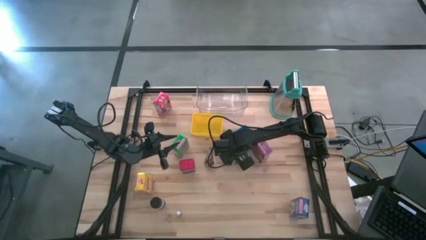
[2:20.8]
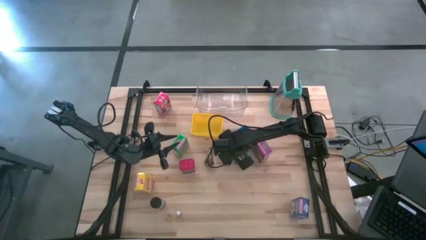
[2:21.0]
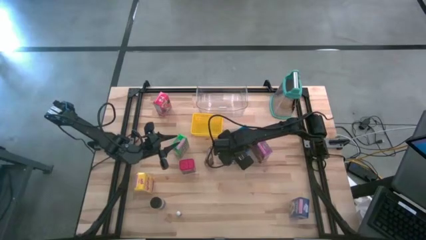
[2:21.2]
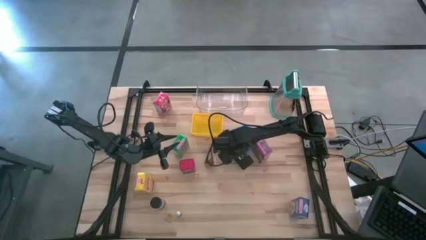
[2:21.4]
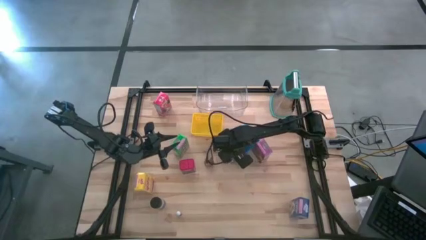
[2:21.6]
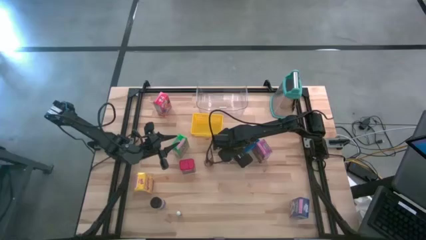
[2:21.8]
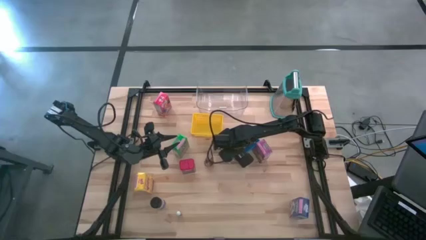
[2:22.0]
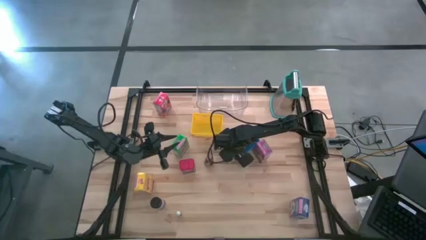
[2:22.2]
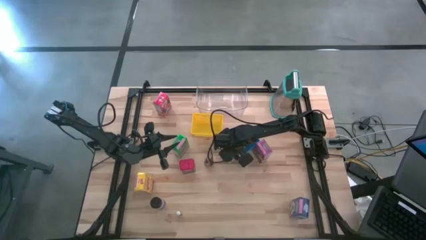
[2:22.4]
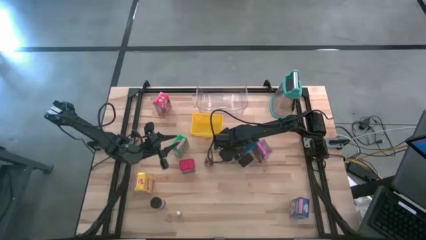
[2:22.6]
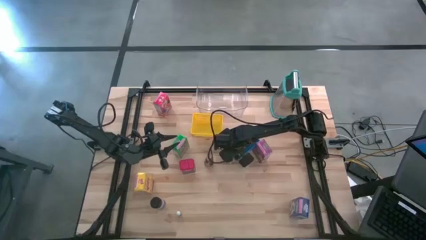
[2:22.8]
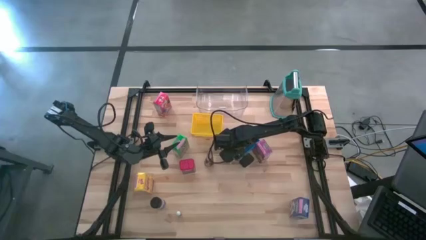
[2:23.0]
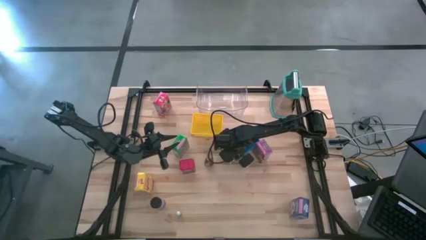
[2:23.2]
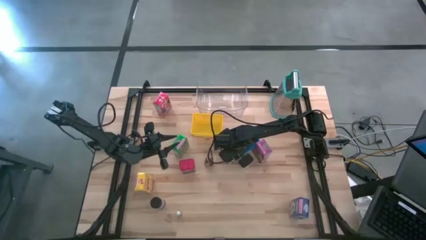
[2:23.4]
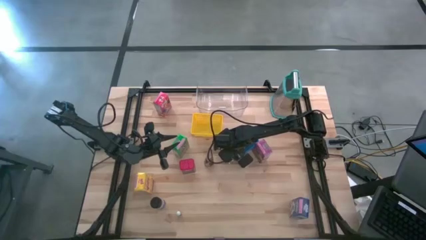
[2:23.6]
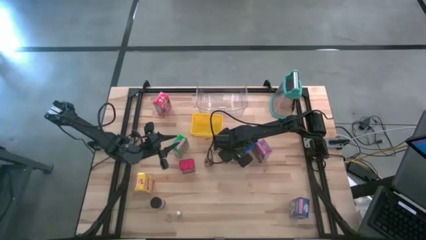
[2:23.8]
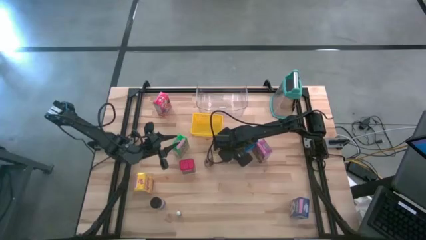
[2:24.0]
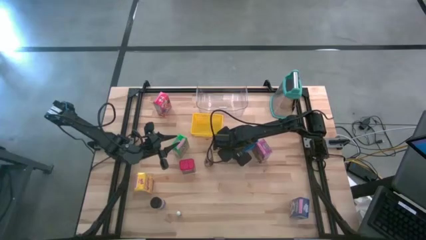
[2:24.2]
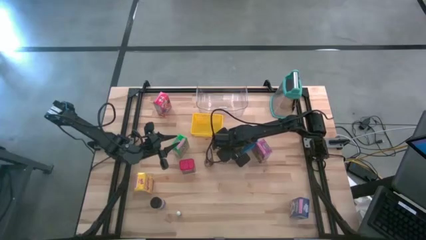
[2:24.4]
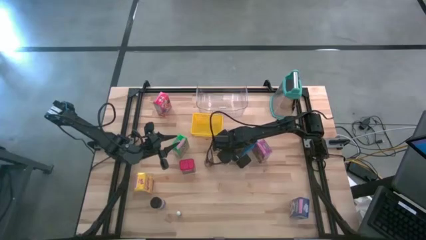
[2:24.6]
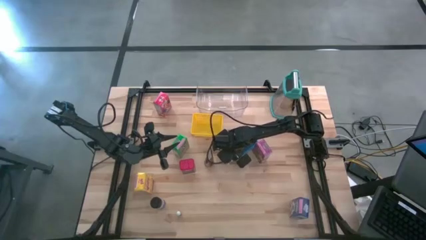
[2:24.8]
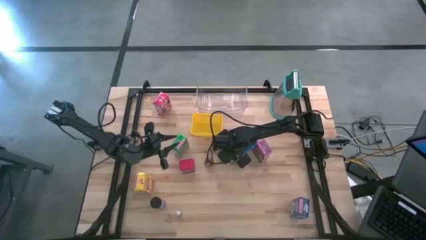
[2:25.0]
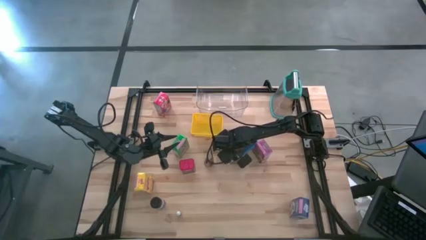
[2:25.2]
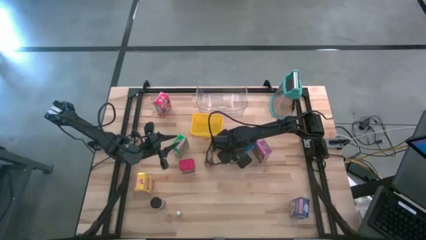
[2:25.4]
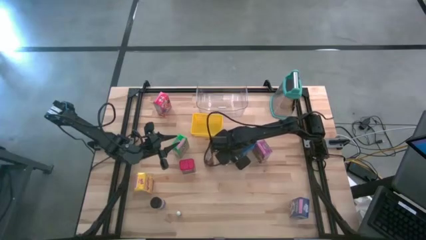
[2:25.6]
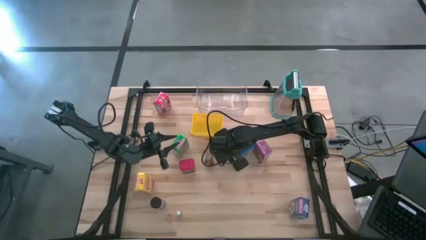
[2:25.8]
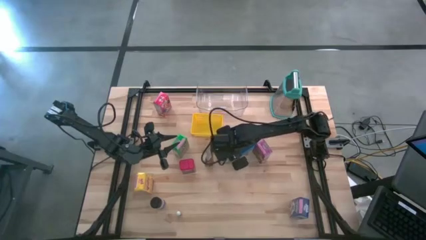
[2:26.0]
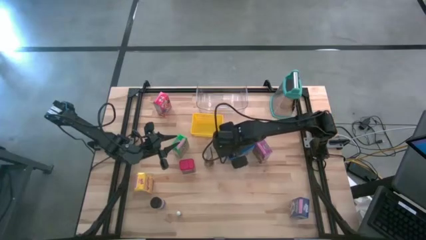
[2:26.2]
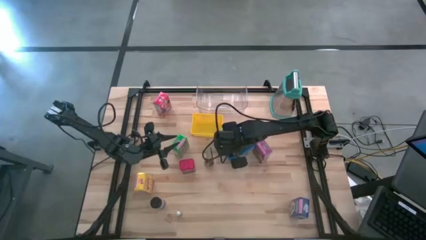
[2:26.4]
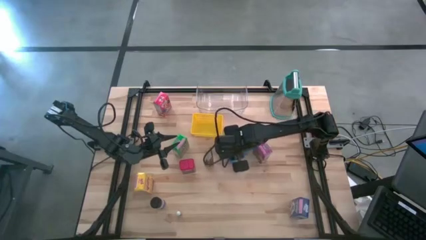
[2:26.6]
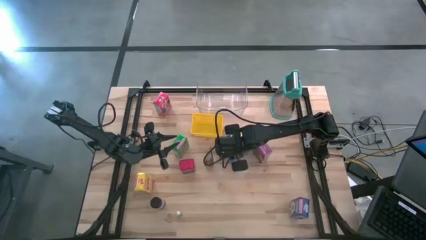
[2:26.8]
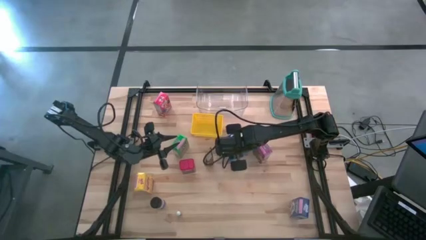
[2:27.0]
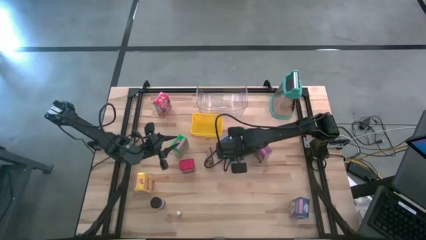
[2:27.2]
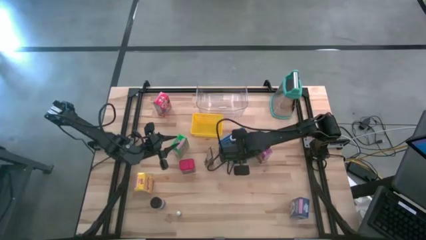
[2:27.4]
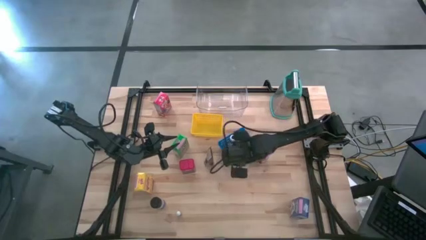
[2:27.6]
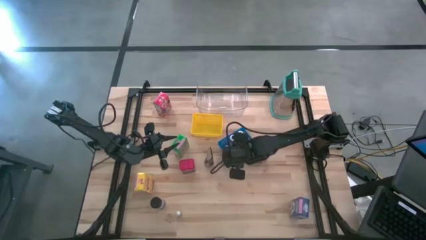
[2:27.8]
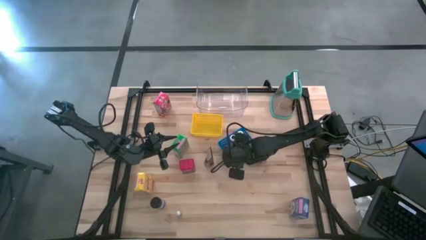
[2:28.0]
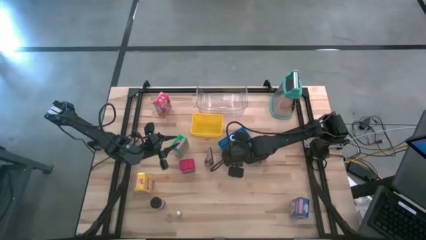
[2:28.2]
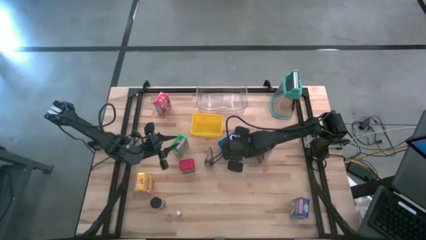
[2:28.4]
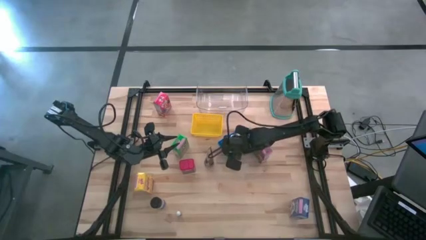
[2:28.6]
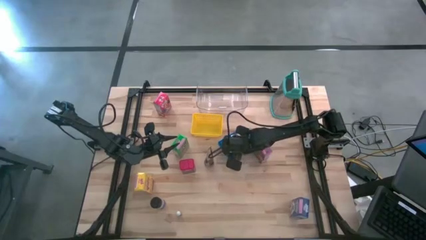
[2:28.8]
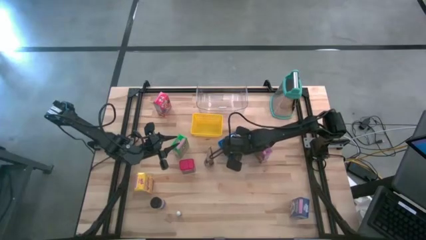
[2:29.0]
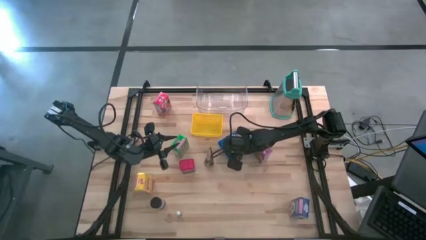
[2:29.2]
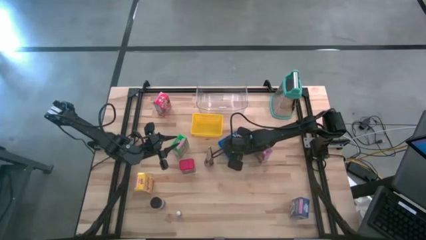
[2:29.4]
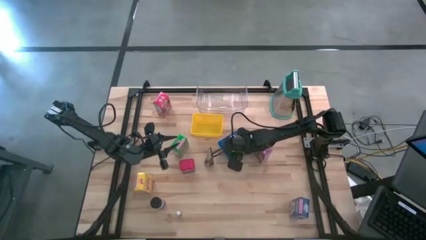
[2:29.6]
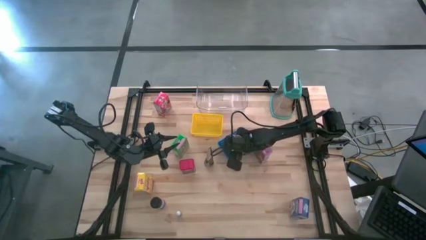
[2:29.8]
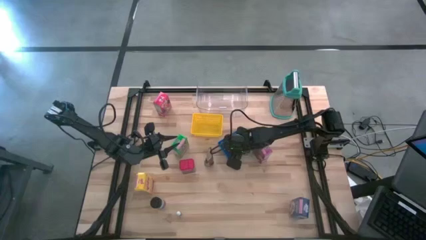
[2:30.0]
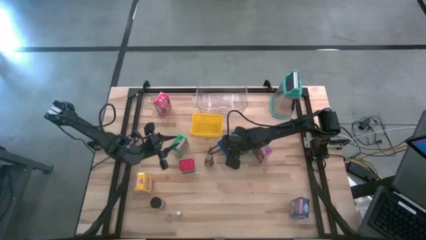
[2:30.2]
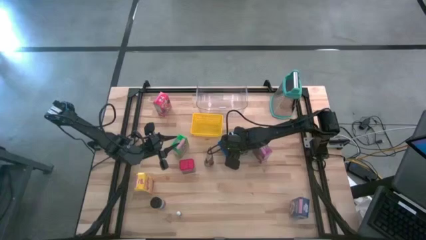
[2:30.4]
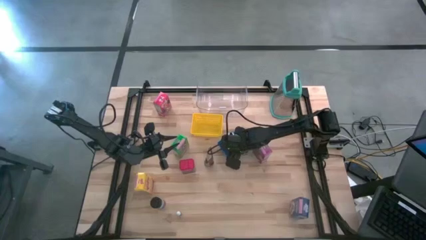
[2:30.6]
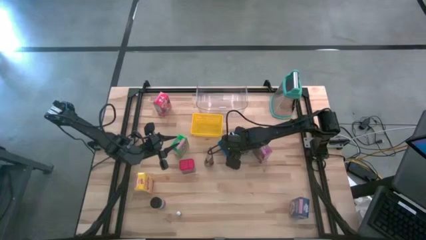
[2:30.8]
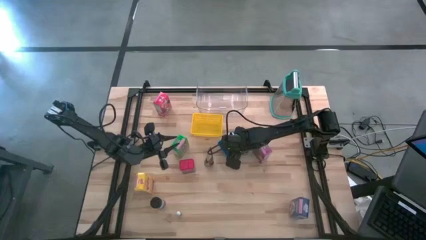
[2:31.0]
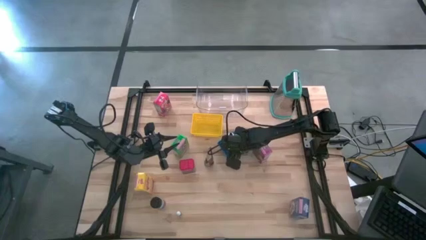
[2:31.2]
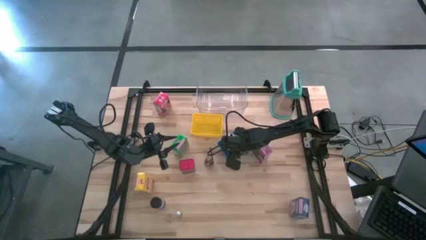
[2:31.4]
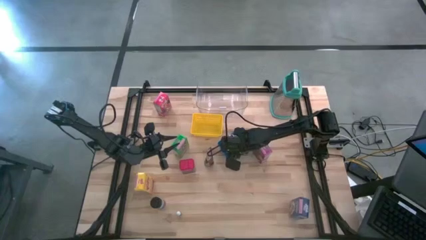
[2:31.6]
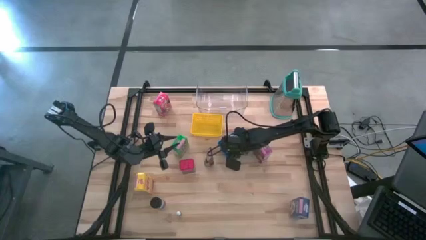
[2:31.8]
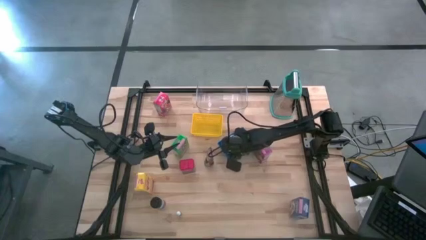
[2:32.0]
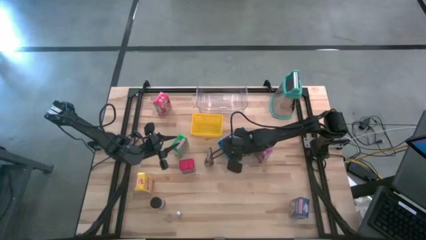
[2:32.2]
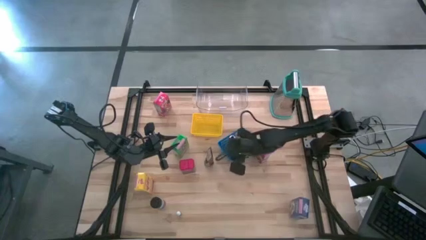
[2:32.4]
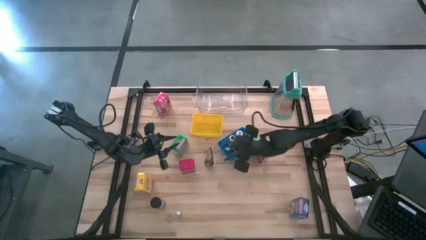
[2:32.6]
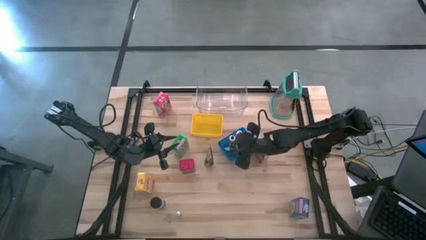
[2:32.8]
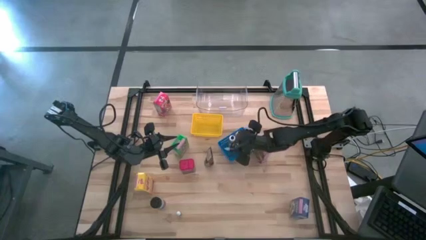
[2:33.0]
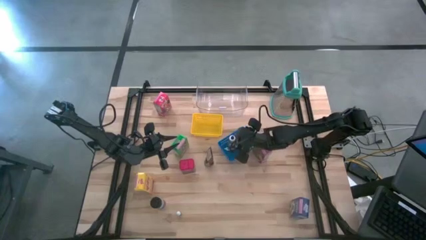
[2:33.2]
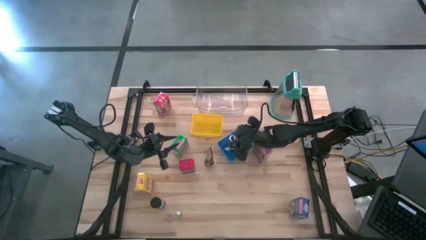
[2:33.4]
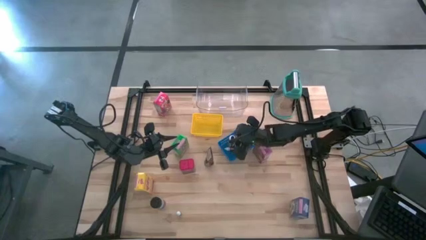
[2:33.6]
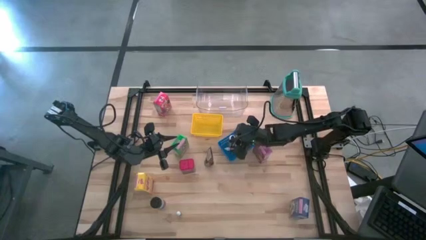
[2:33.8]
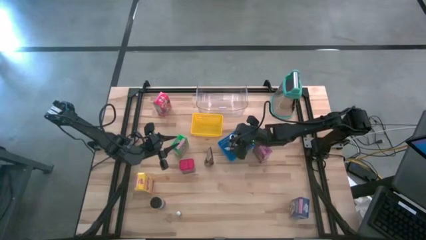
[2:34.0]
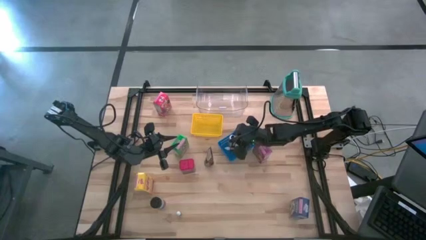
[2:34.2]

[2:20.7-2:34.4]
Task: Pick & Place Kitchen Items
Put the orange food coloring bottle into the blue bin

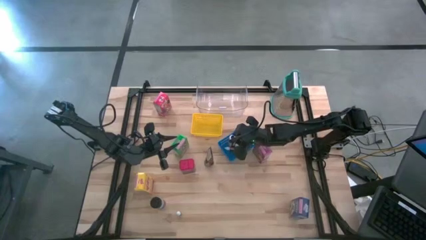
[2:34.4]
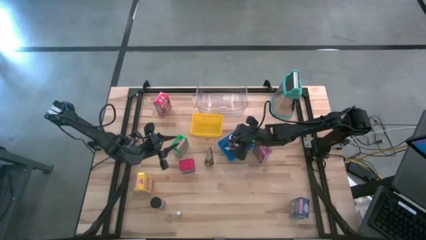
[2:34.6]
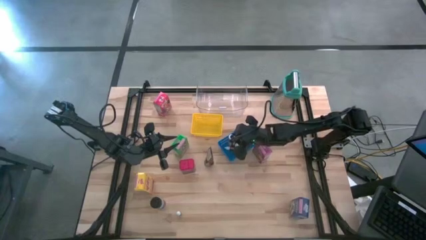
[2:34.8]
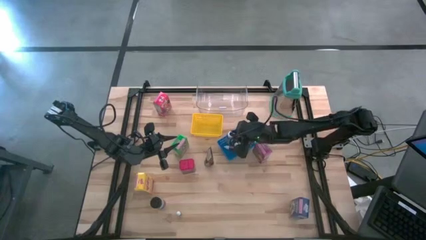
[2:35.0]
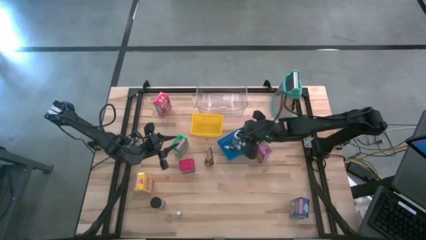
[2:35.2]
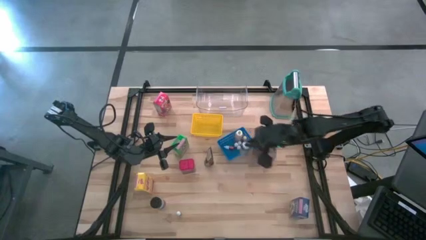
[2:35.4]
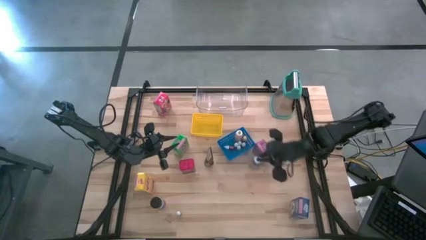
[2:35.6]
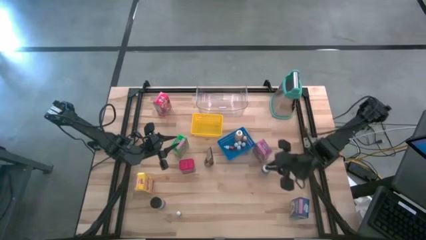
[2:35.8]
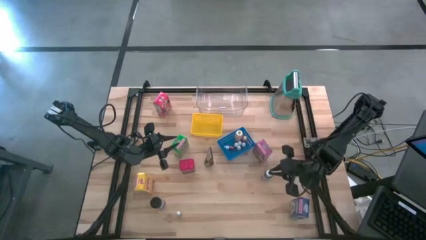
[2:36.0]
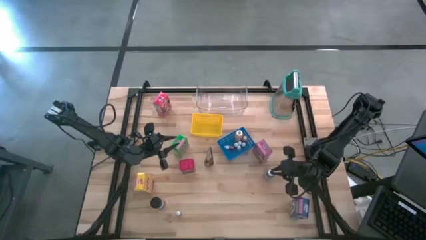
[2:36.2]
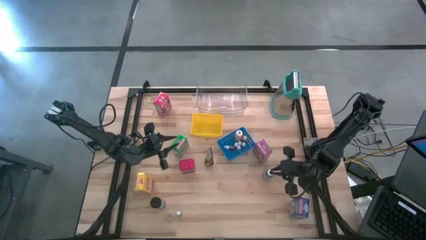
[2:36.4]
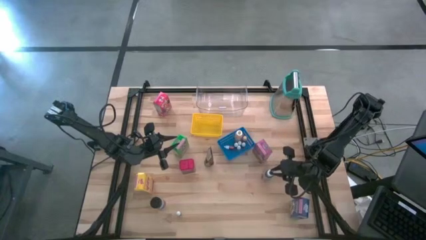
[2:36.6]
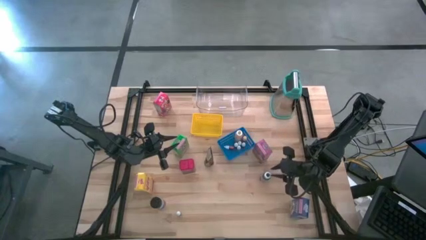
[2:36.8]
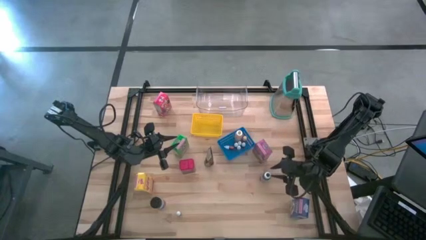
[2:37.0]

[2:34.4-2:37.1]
Remove the black food coloring bottle from the blue bin
